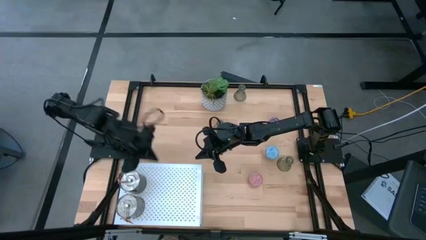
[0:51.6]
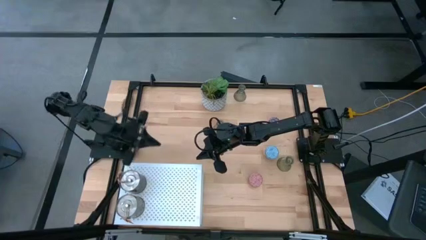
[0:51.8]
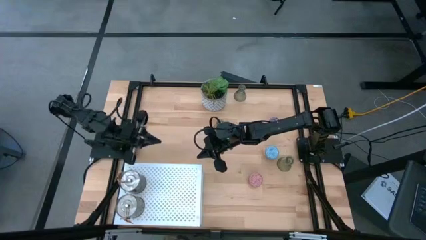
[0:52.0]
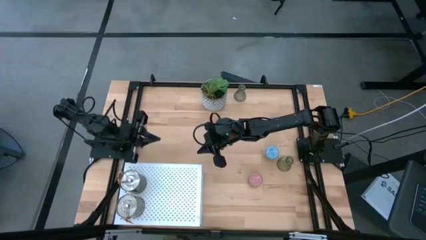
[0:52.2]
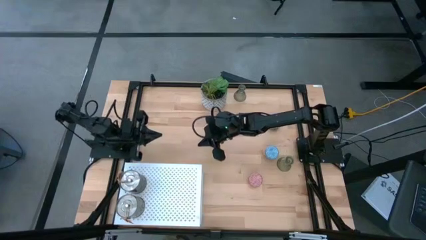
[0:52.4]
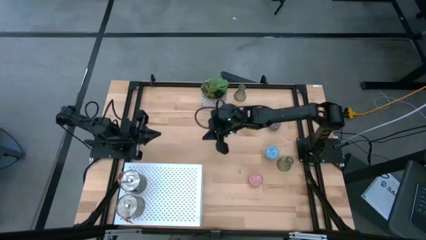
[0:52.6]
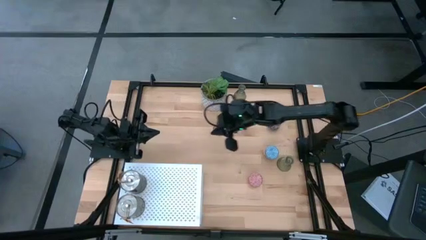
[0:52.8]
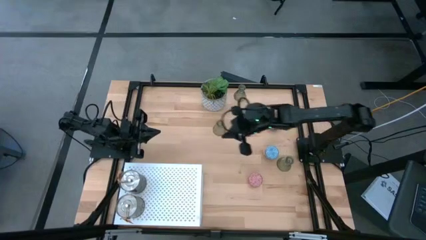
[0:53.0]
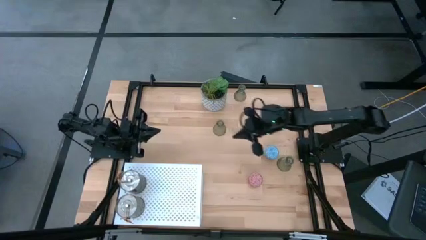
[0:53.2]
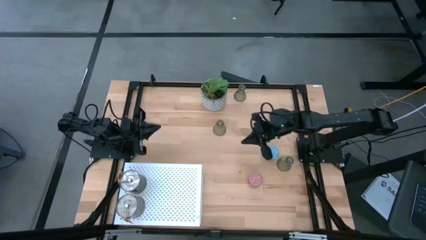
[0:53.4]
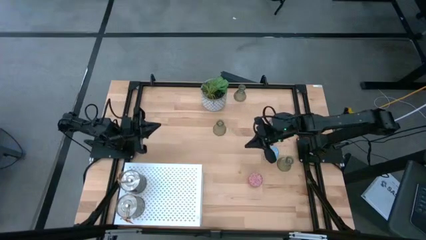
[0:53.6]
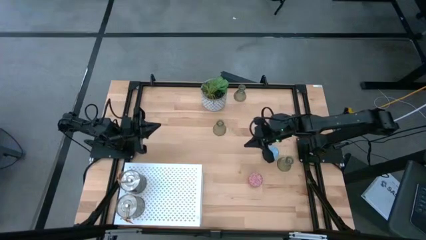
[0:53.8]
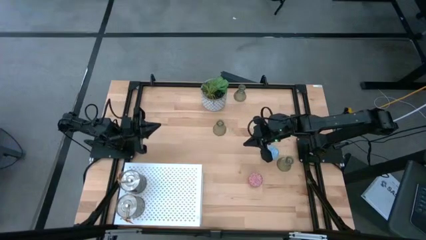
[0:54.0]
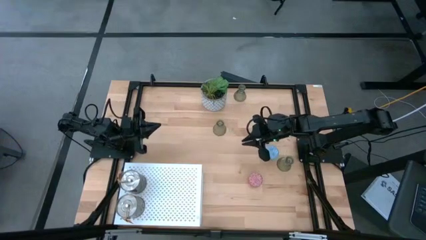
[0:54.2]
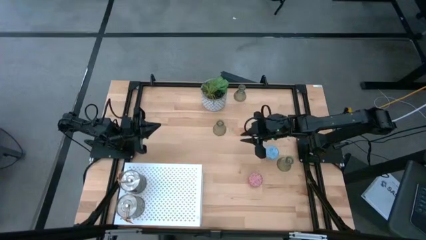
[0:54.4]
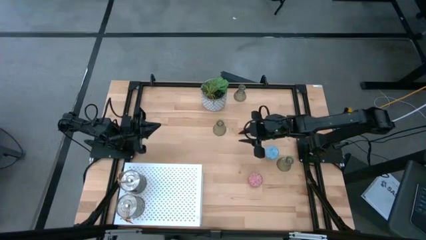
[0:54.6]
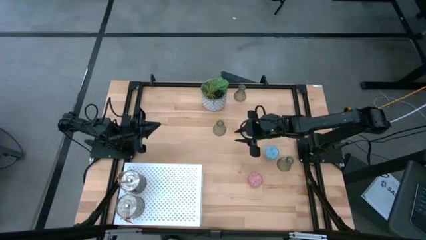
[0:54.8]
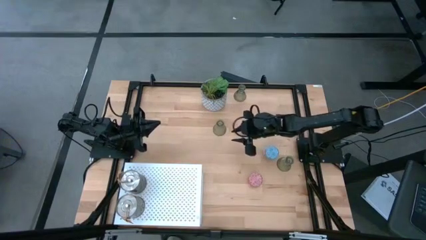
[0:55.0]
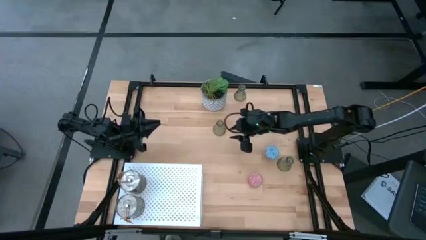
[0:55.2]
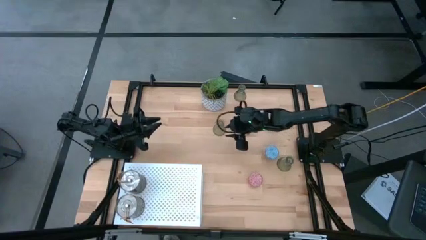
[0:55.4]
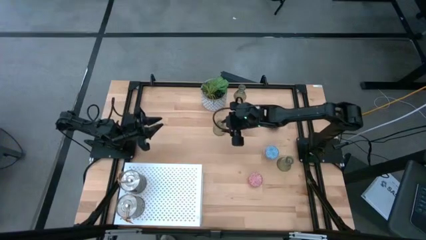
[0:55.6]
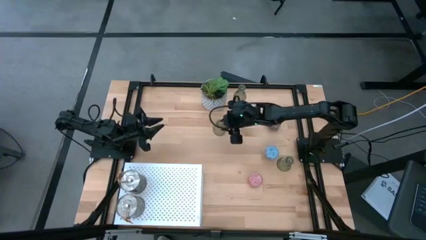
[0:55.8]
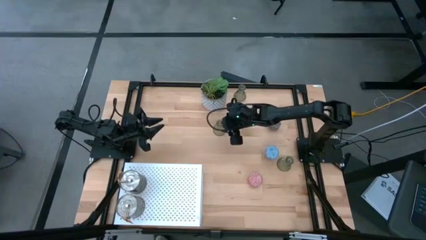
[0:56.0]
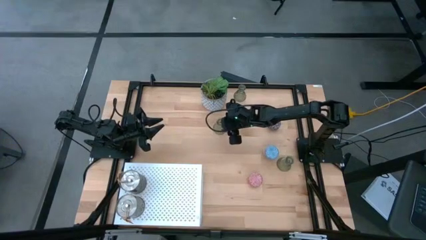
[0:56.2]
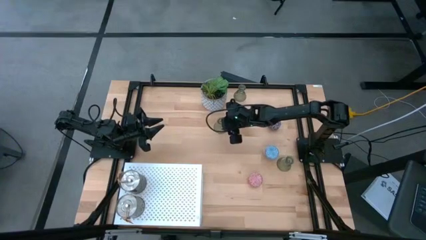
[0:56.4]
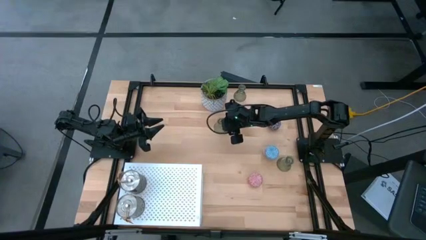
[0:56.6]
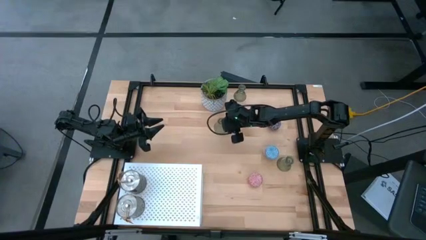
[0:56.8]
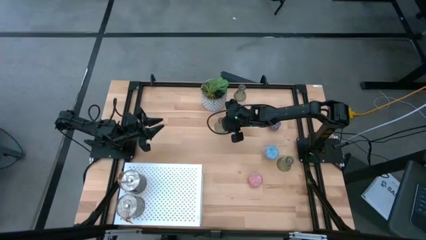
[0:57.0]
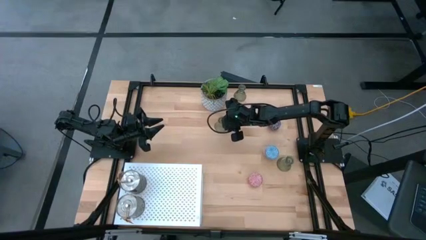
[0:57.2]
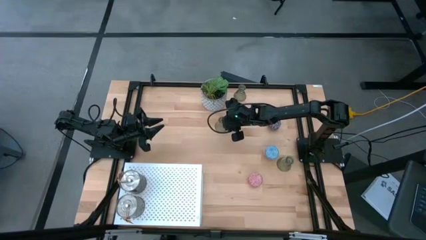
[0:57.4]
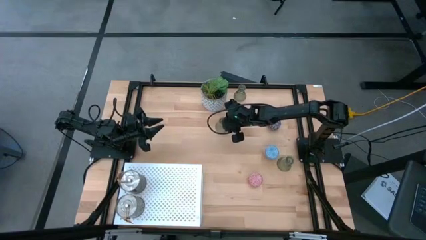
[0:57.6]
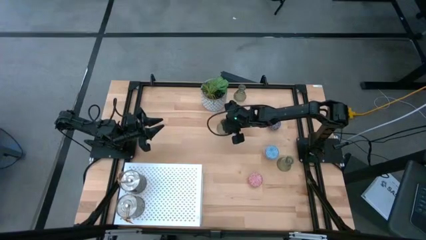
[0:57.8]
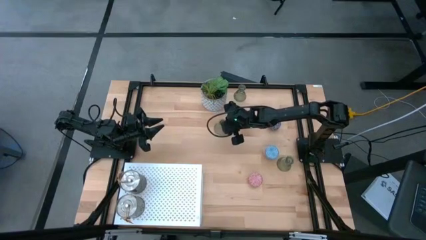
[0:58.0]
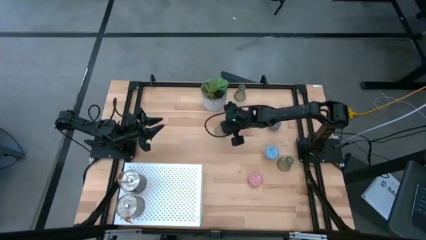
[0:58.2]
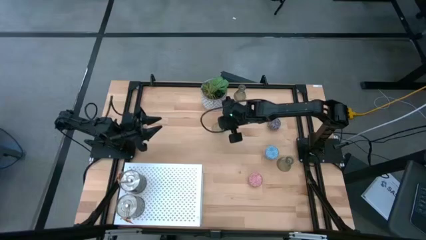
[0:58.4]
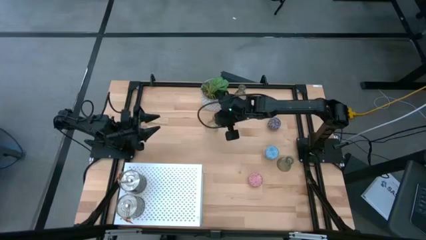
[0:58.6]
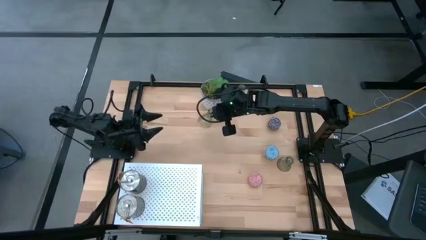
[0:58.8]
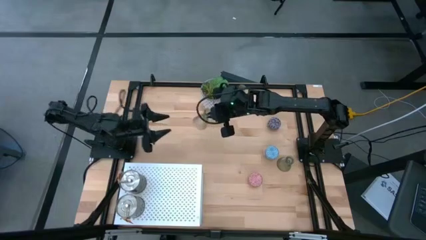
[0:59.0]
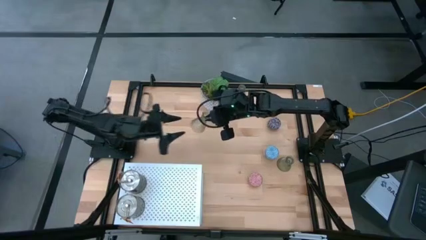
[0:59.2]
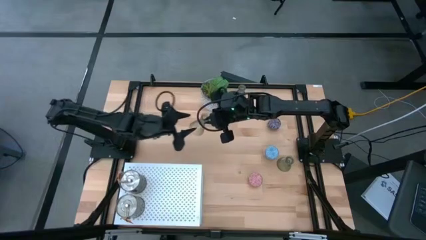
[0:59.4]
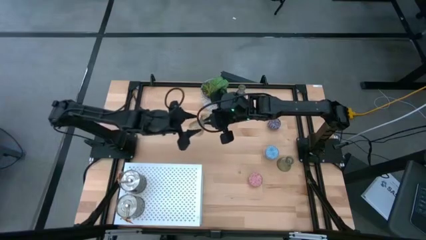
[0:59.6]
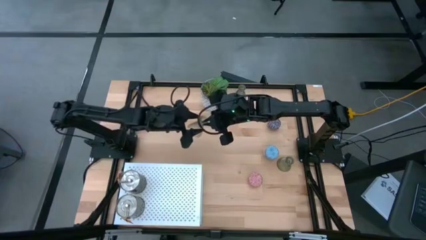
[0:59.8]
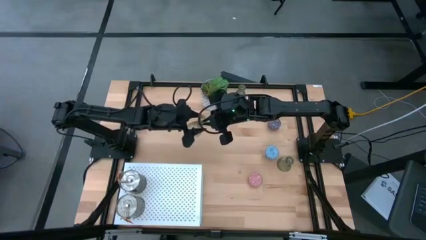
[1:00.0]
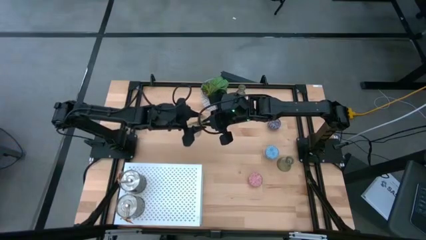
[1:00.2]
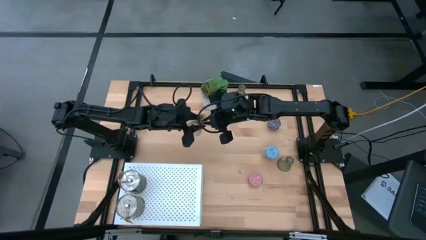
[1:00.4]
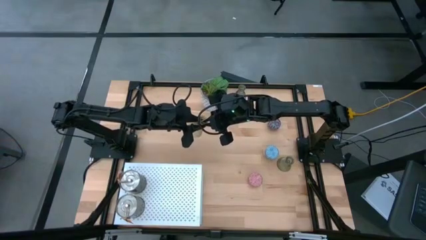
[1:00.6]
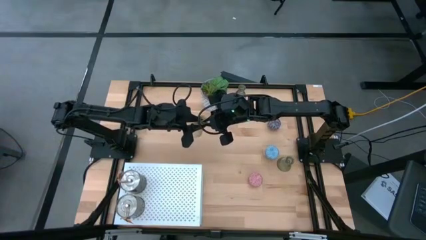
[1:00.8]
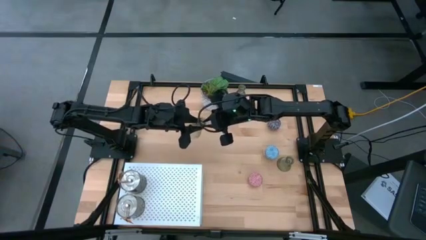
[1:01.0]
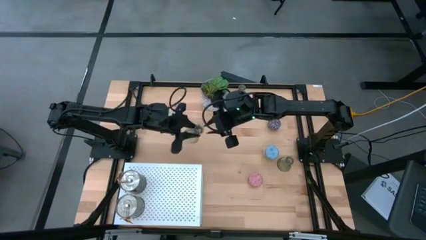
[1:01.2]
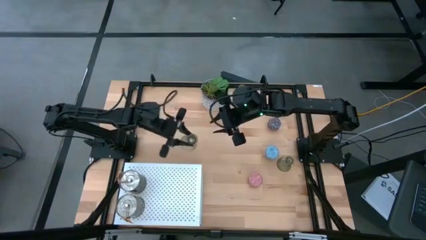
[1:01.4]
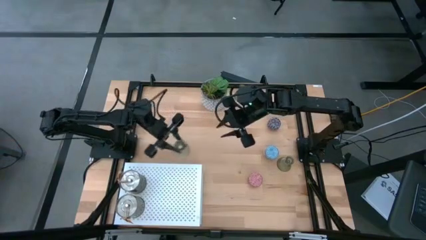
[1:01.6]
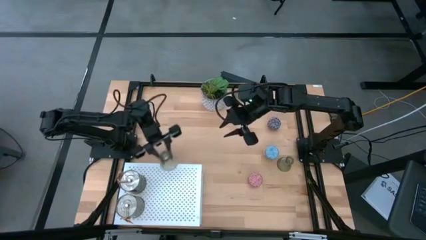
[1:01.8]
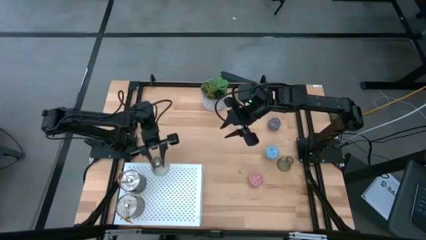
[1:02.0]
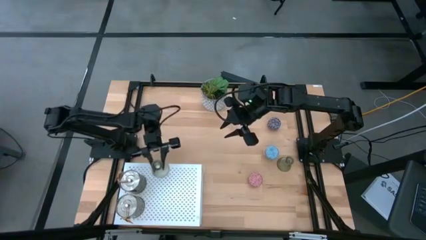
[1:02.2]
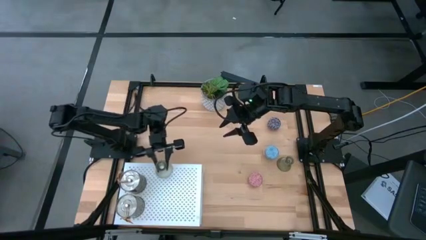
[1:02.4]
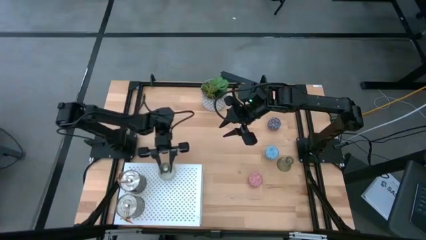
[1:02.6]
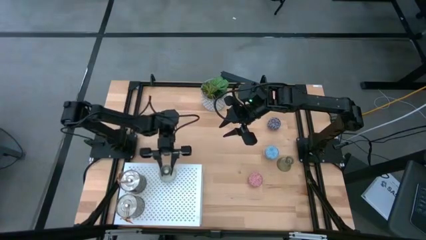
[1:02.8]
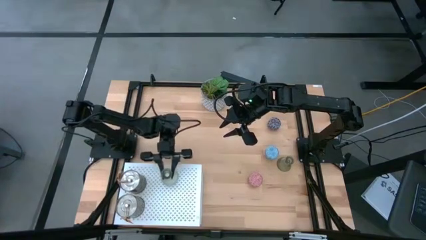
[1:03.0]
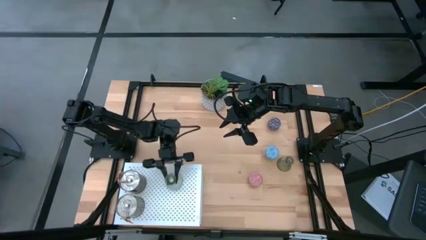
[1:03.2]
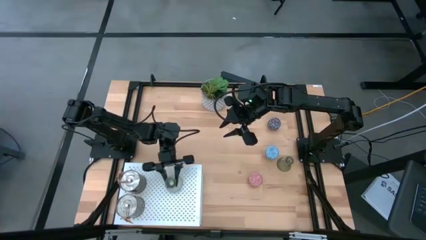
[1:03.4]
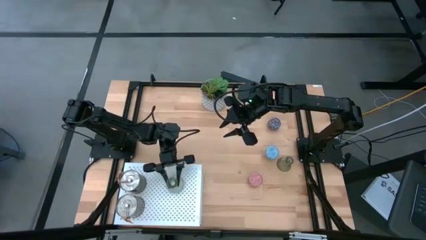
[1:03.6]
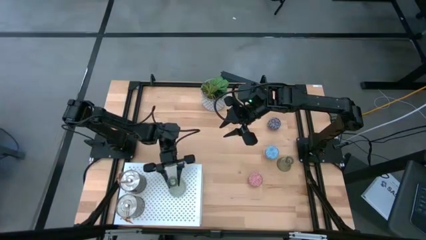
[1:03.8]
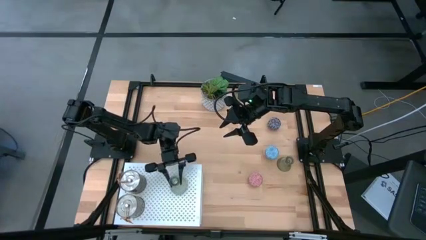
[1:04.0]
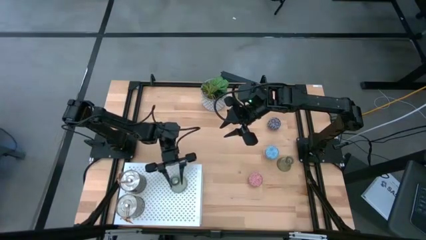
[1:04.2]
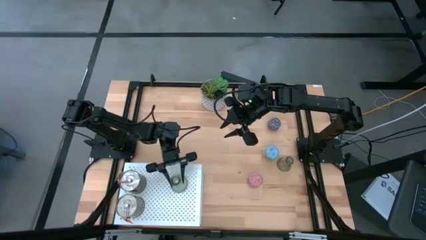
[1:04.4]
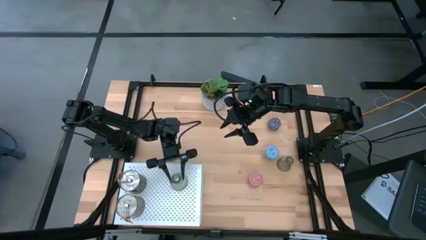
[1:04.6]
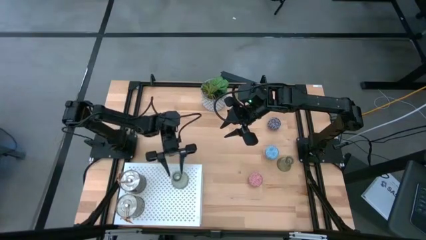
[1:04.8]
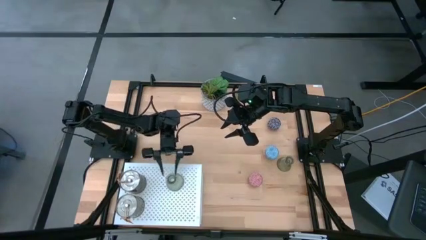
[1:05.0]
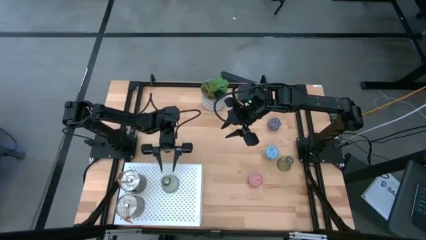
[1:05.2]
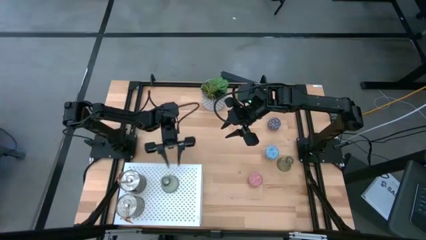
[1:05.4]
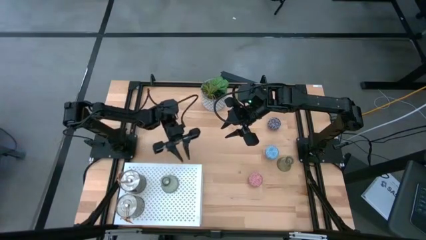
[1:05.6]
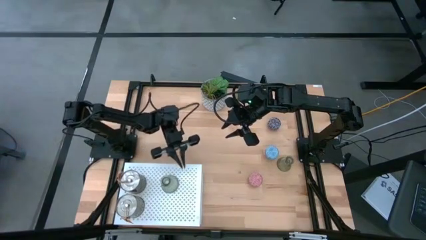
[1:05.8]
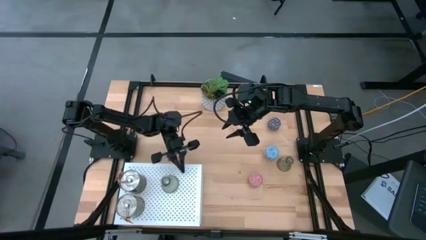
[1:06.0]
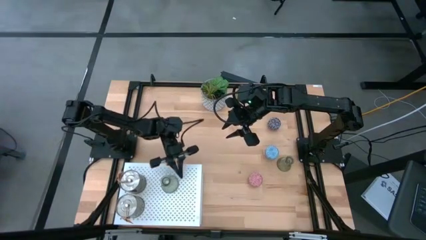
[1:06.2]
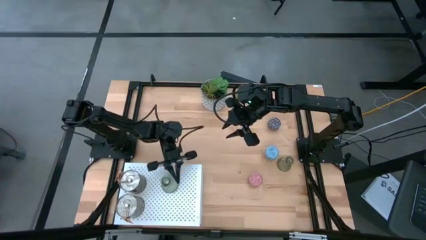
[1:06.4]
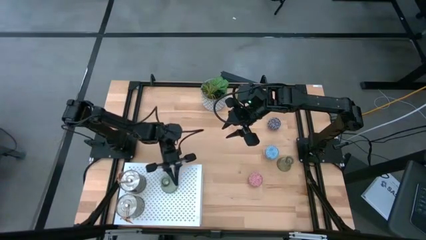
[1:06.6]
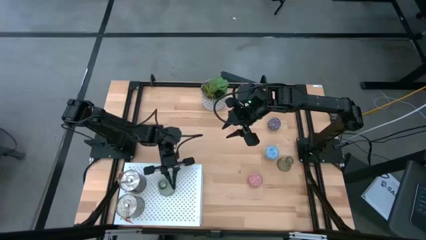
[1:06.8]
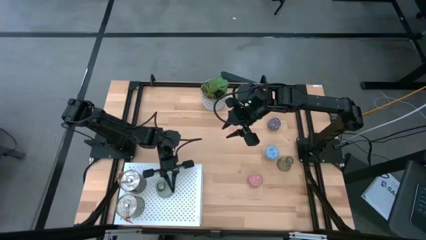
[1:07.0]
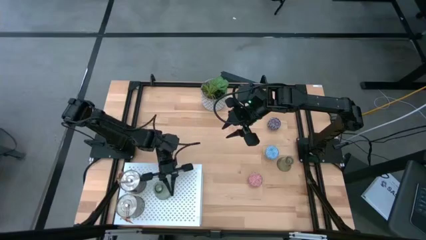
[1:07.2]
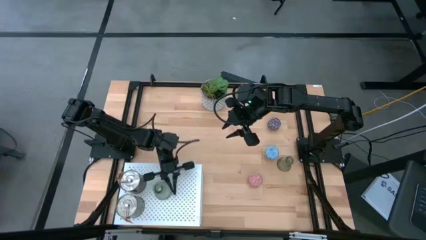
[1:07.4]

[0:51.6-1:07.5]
Task: Pick & Place candle stick holders
Put the middle transparent candle holder on the shelf

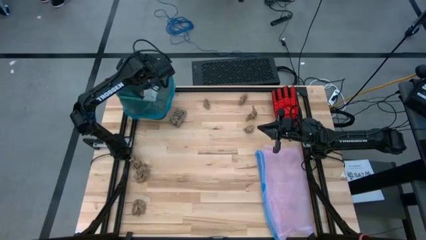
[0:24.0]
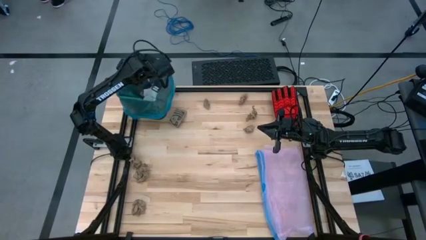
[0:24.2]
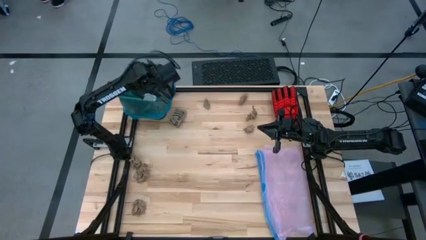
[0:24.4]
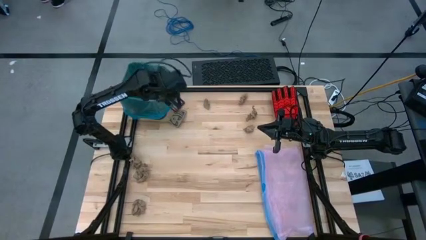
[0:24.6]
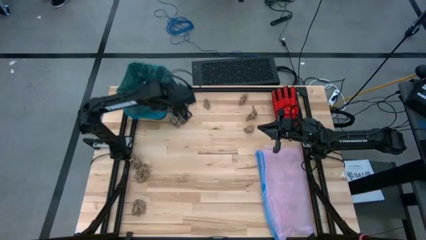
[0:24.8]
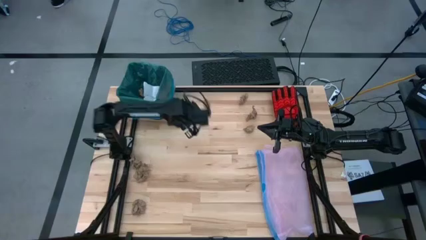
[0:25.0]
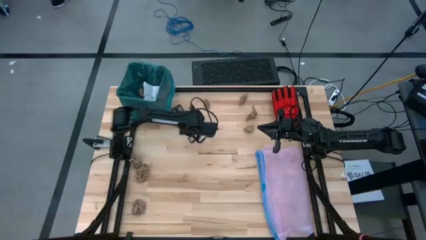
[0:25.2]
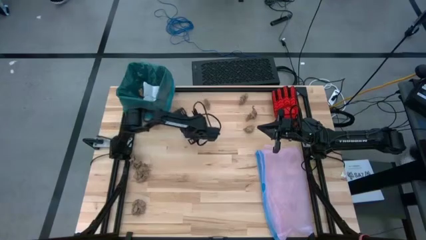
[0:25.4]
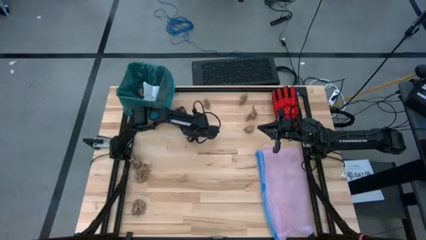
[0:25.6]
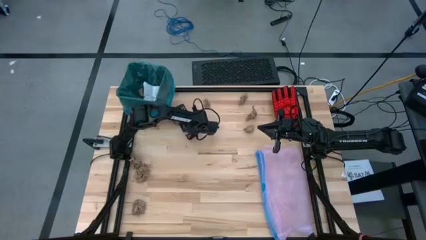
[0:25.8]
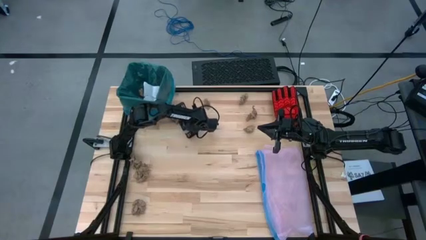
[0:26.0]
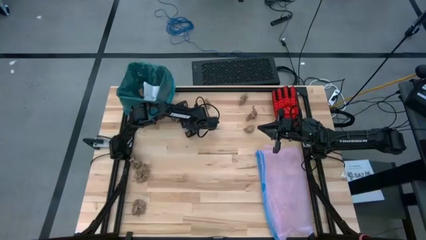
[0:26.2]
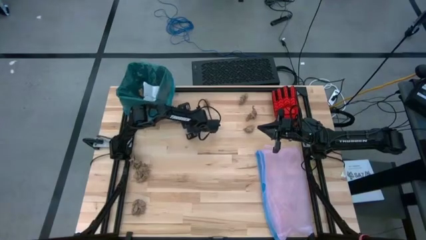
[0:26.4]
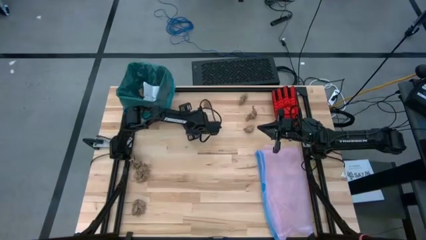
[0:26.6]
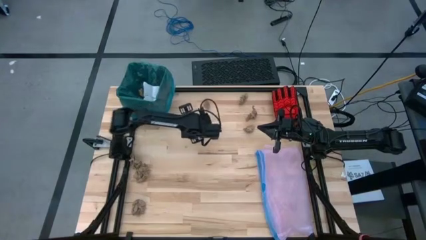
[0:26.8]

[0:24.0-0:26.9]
Task: place trash/remove bag and relplace
Put the brown paper into the black trash bin
